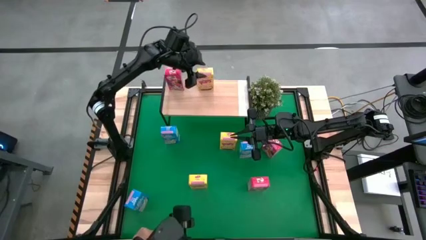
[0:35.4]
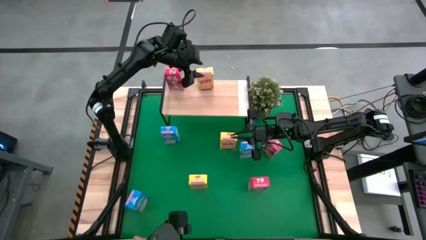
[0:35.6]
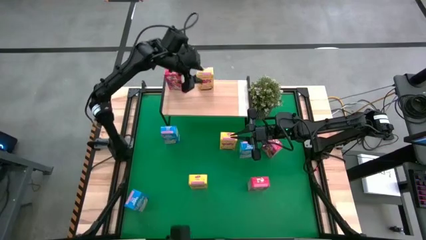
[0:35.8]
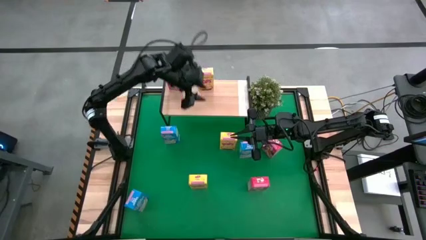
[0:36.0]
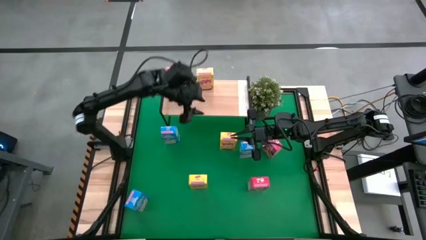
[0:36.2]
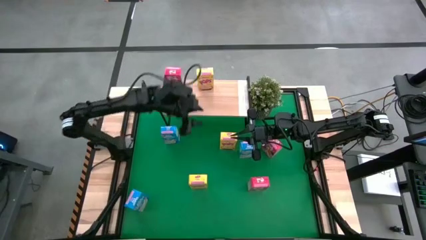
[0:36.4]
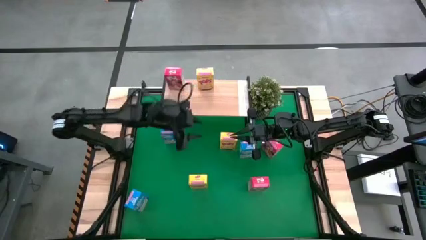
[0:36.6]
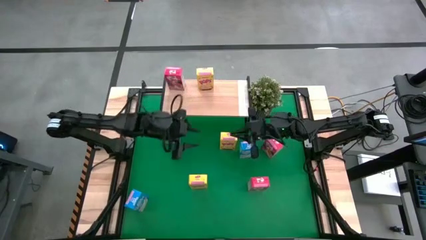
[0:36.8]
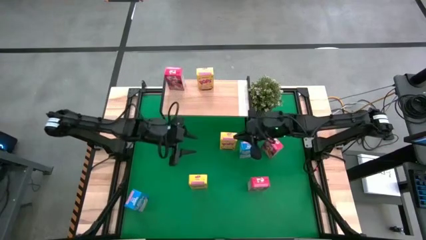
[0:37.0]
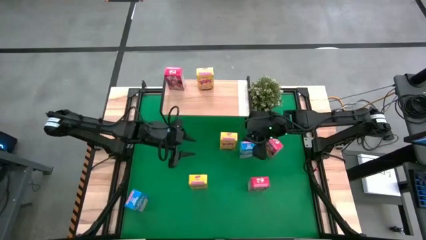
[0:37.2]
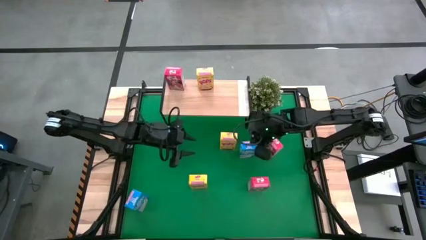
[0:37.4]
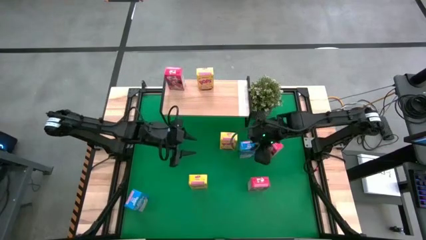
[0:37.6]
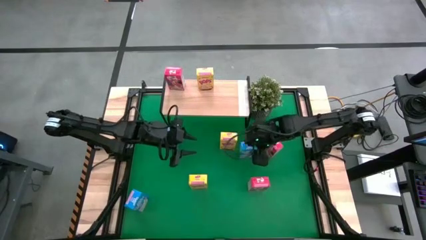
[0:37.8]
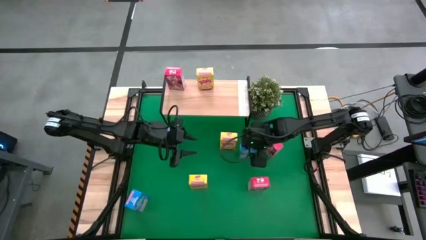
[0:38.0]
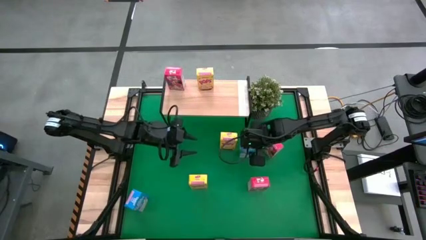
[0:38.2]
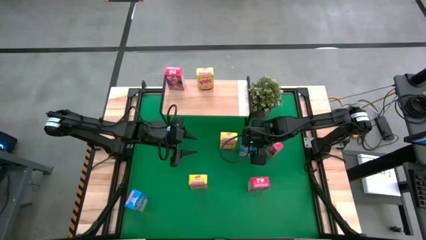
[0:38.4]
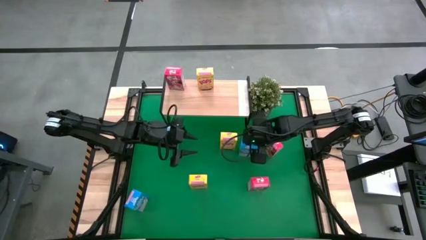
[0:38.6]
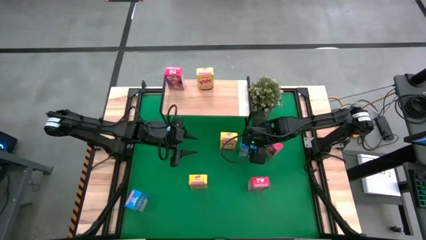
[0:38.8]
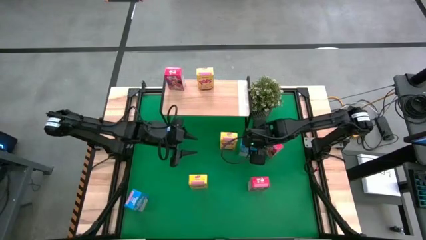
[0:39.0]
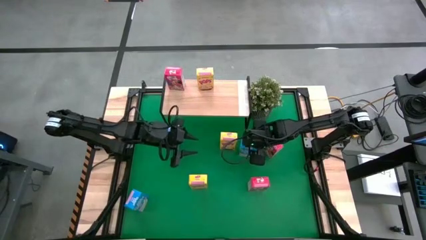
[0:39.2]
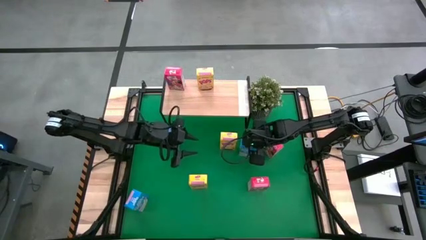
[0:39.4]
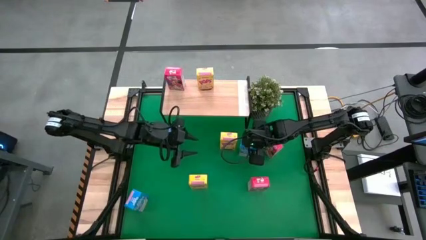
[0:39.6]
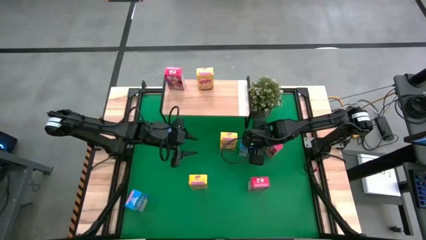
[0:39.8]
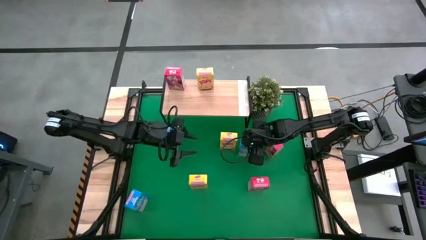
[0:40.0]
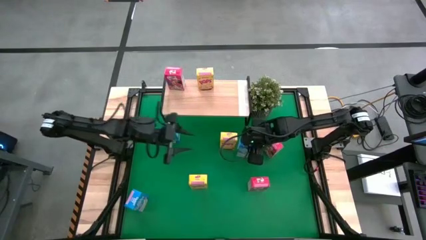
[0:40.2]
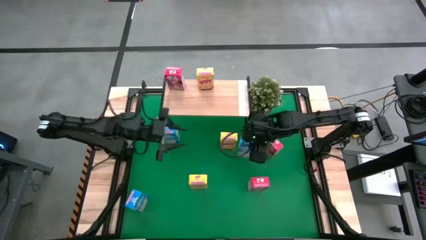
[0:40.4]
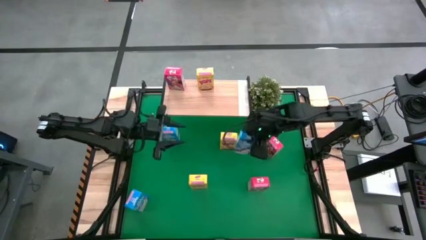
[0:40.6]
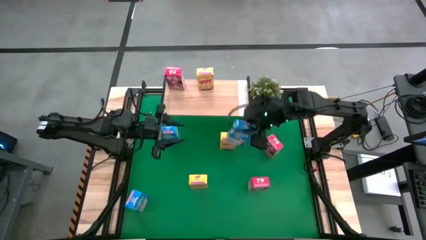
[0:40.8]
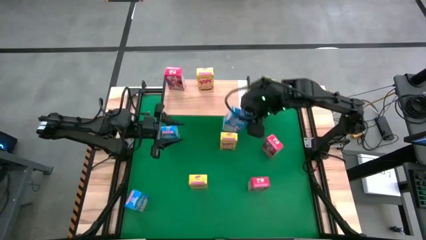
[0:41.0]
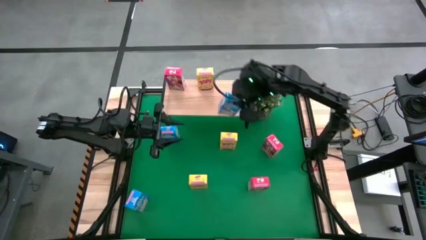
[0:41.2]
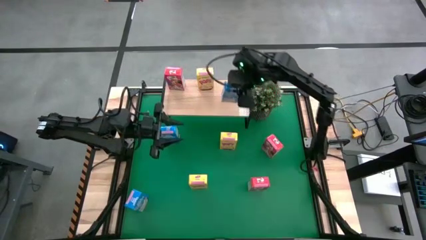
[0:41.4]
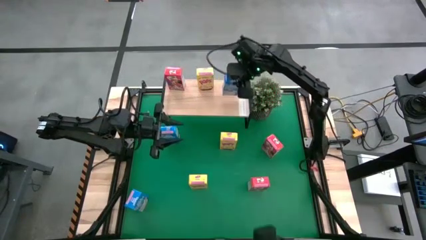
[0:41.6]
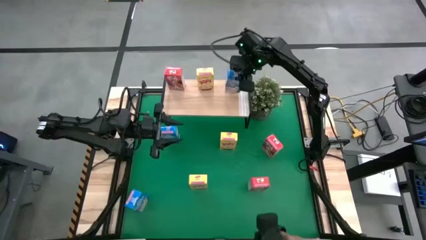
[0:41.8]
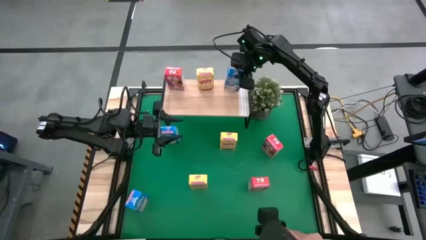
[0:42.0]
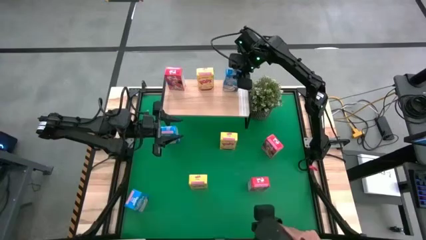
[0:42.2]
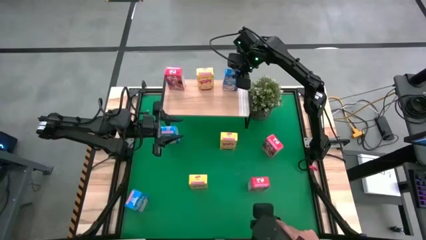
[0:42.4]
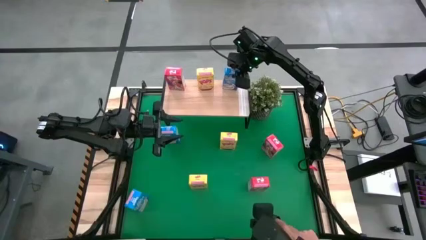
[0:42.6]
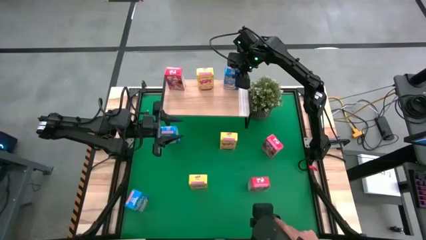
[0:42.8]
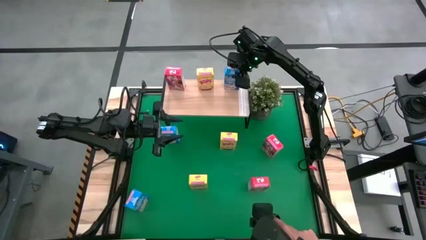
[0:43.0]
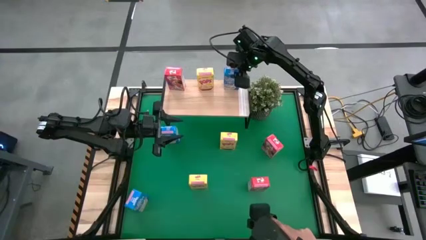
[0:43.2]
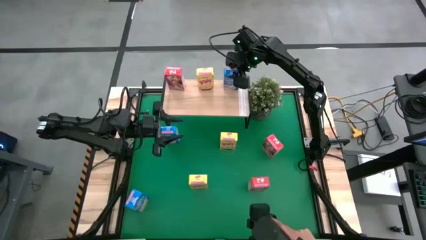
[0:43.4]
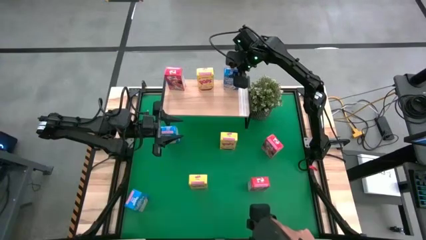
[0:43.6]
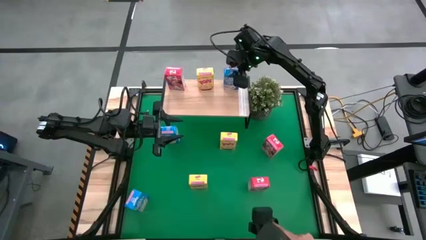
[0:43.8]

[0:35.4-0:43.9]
Task: Stack cereal on shelf
Put the top right blue cereal box on the shelf

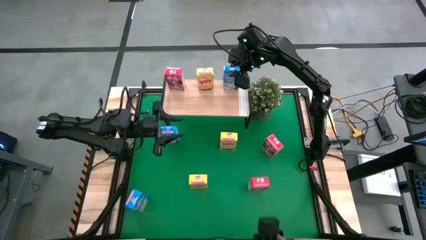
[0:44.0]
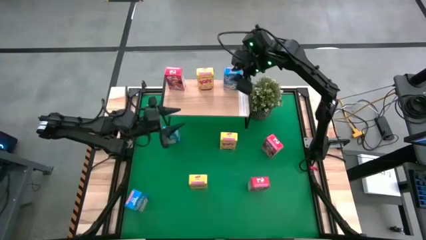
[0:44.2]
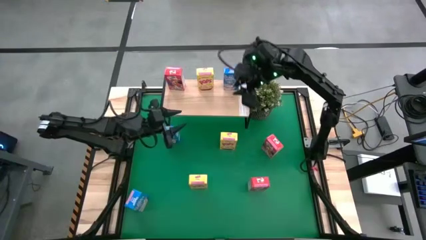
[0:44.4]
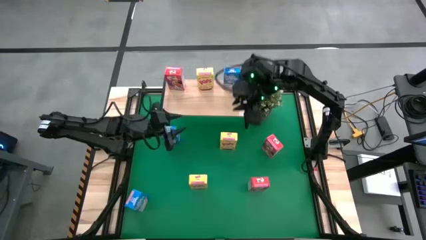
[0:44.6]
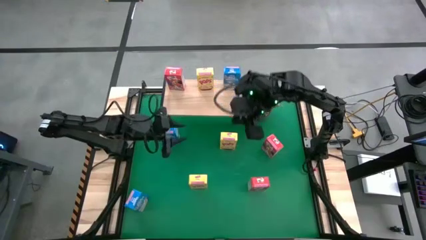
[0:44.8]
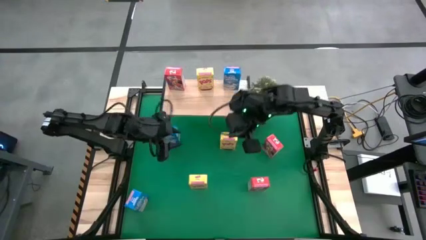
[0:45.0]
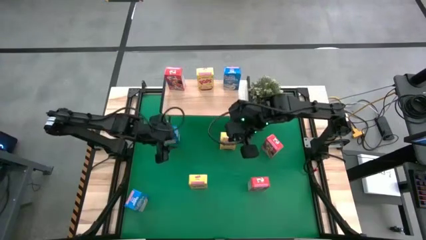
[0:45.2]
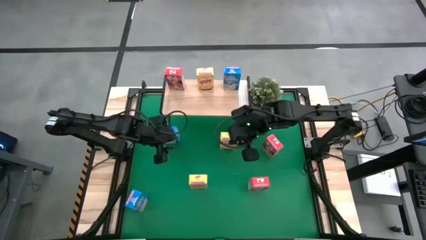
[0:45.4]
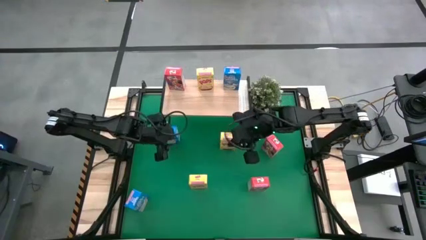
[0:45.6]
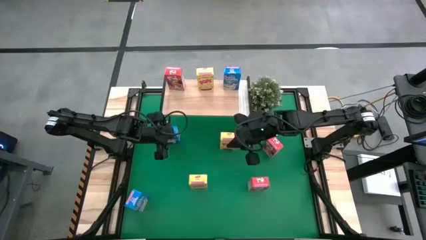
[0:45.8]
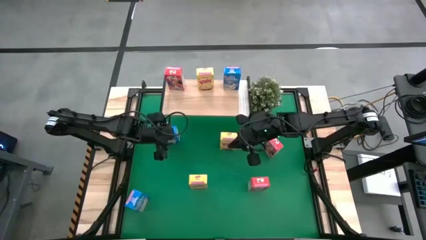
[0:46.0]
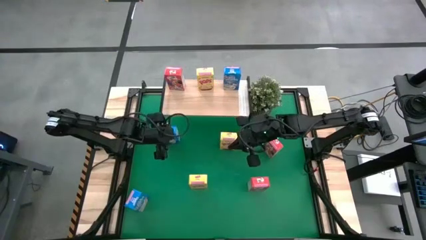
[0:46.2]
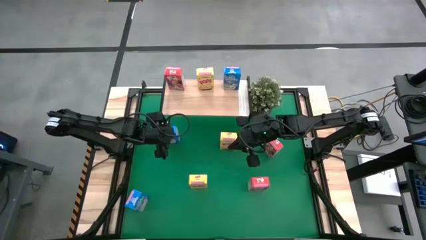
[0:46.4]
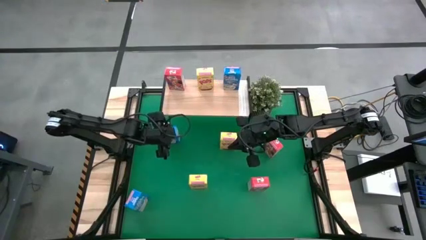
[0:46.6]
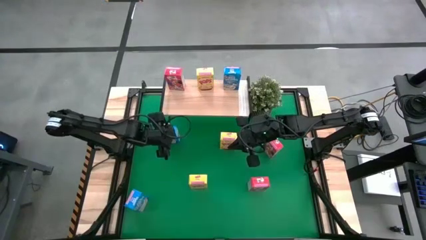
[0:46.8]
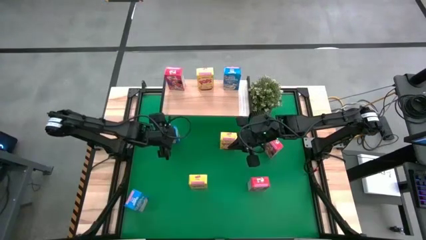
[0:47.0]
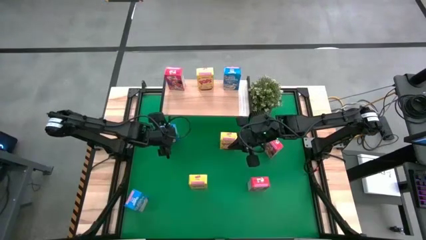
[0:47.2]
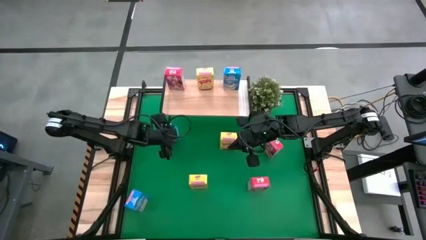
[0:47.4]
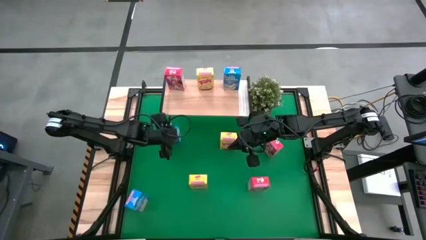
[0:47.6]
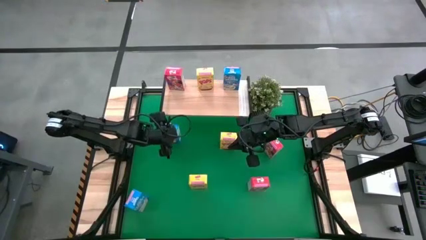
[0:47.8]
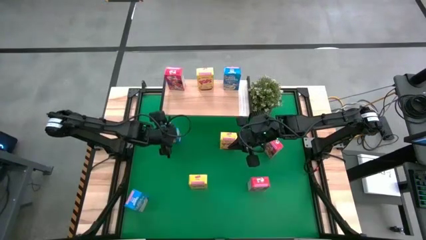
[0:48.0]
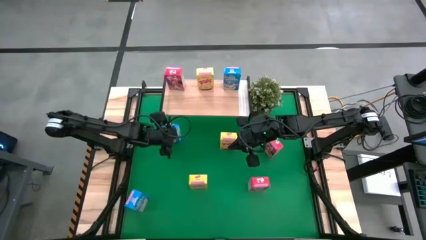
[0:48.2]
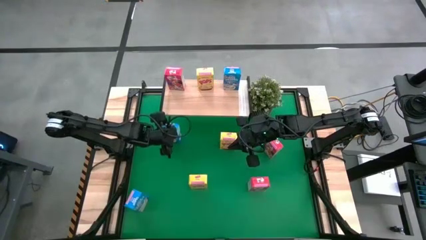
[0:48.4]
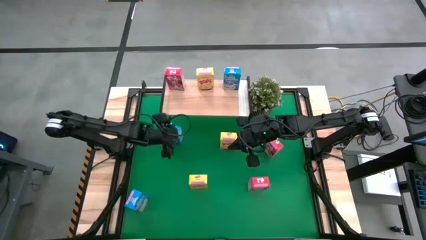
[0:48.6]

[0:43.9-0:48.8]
Put the top blue cereal box on the shelf aligned with the other blue cereal box

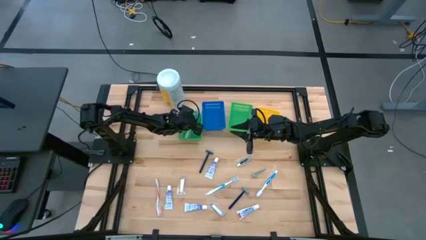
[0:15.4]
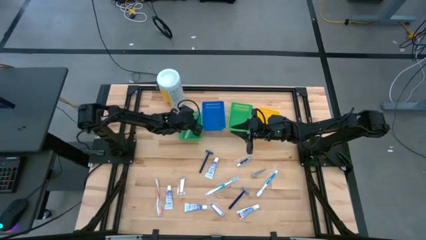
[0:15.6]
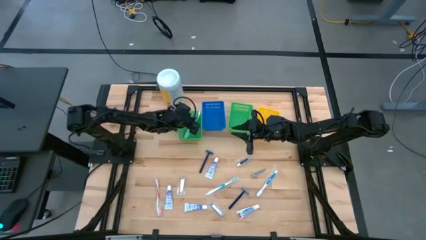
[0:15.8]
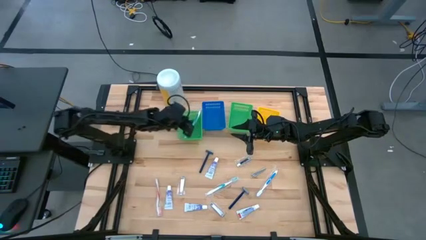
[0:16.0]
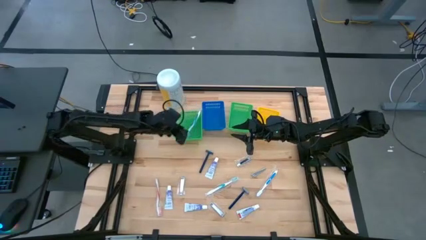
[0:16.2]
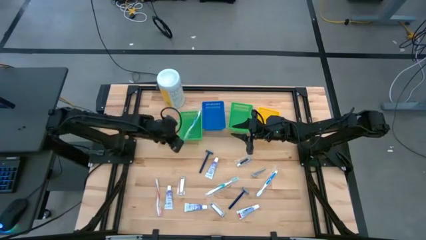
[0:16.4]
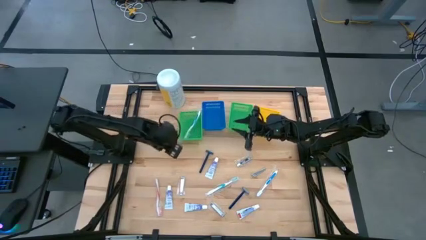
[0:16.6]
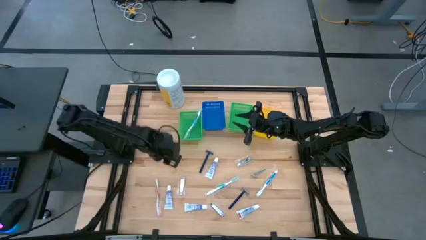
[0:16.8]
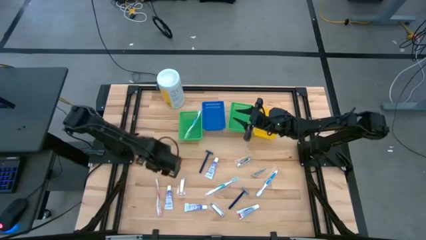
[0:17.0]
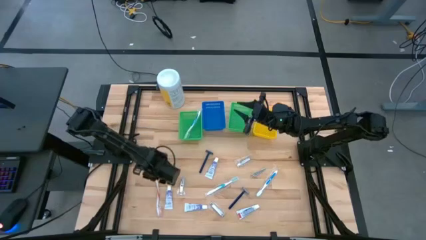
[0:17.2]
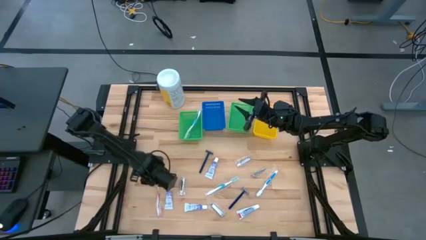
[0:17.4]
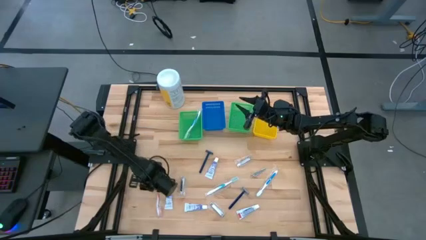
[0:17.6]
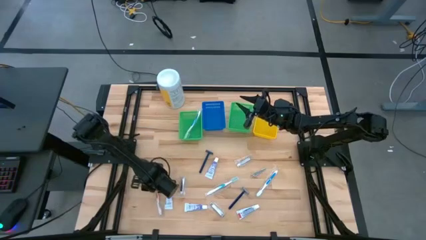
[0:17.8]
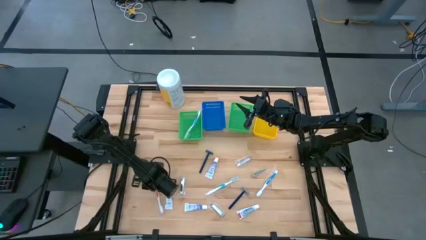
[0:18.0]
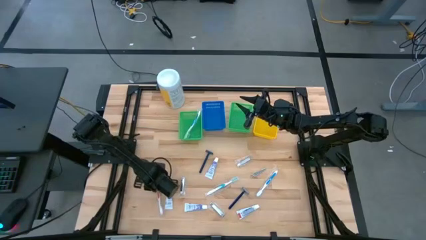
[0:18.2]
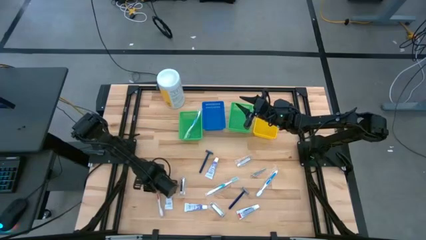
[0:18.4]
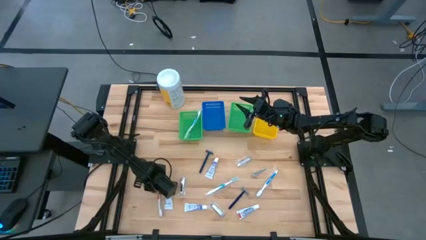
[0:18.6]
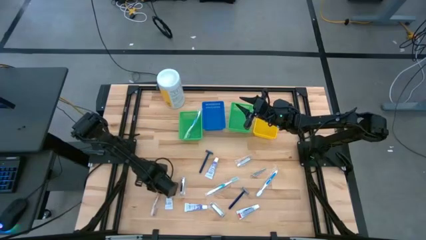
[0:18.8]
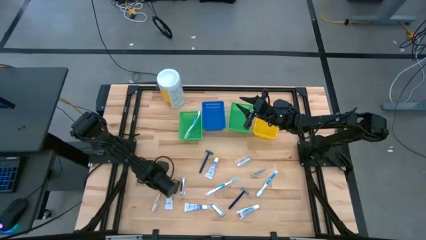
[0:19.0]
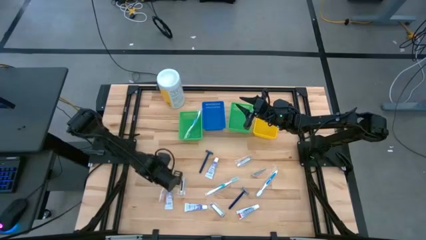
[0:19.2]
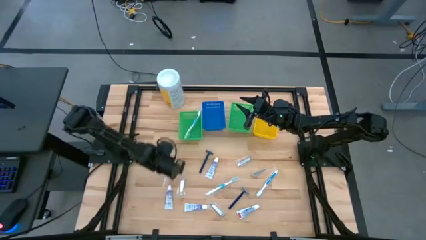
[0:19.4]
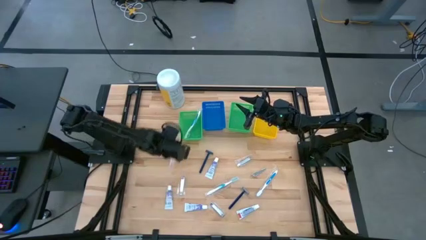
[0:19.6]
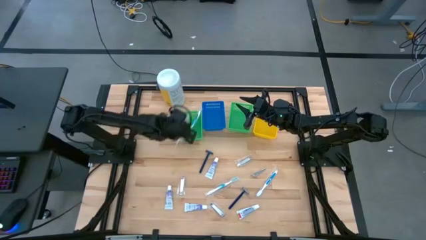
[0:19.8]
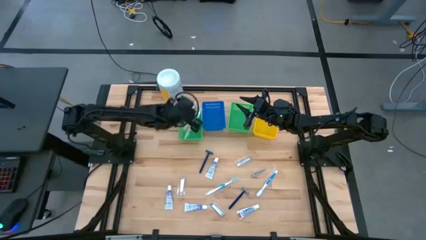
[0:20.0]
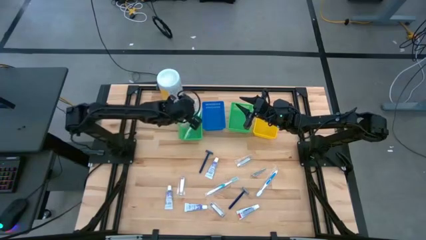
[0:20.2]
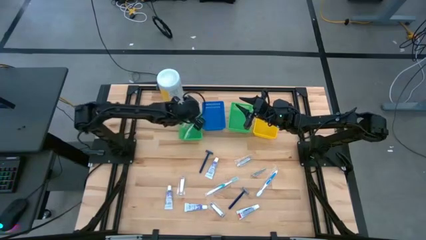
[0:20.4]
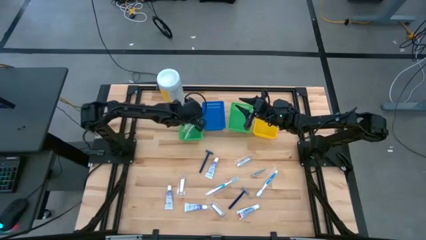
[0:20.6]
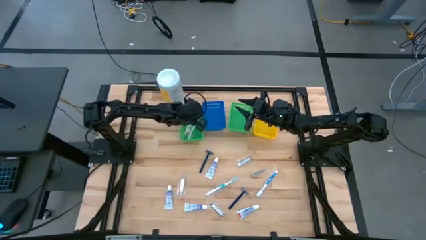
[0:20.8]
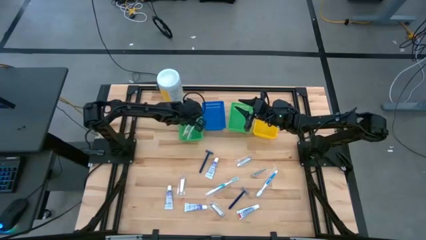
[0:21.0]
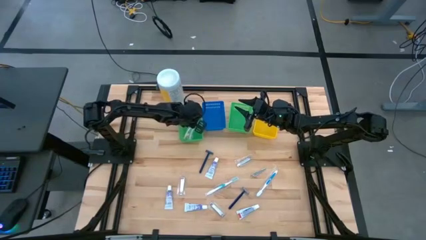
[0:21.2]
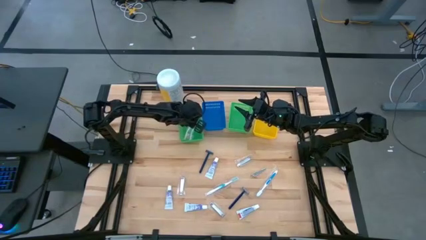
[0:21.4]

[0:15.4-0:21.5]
Task: Pick & Place Travel size toiletries
Put the red toothbrush into the left green basket
